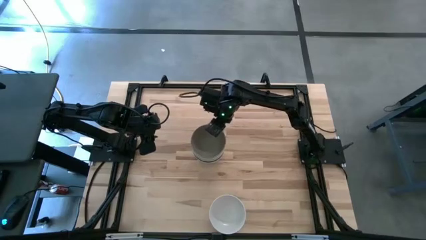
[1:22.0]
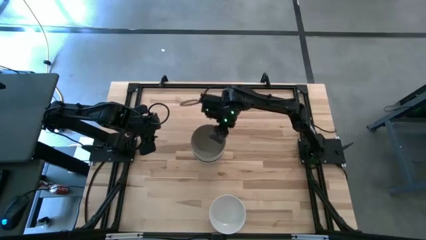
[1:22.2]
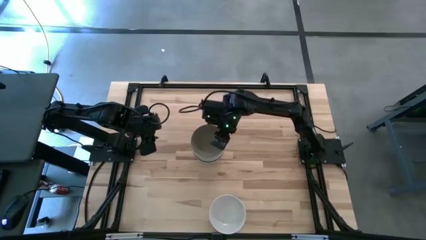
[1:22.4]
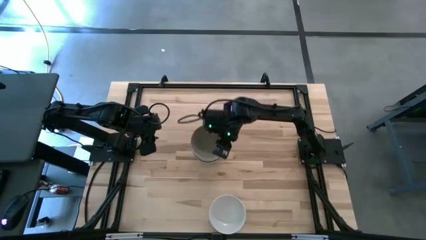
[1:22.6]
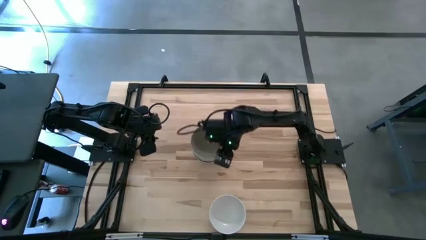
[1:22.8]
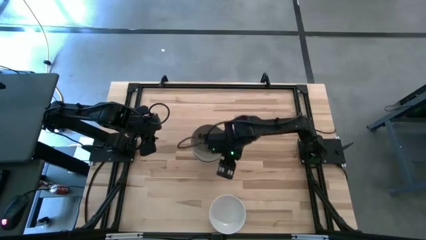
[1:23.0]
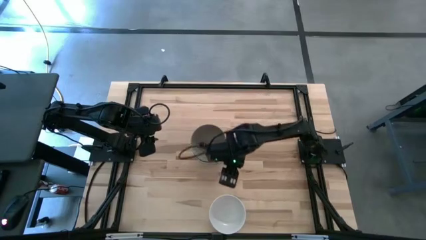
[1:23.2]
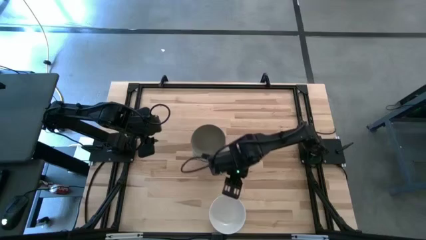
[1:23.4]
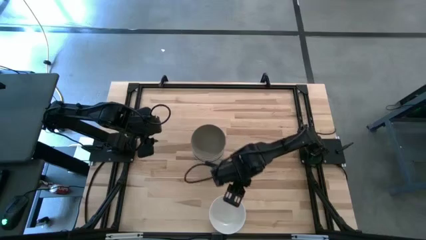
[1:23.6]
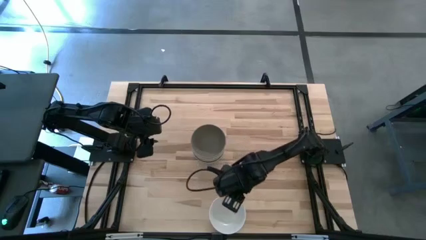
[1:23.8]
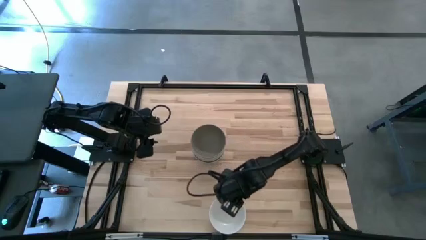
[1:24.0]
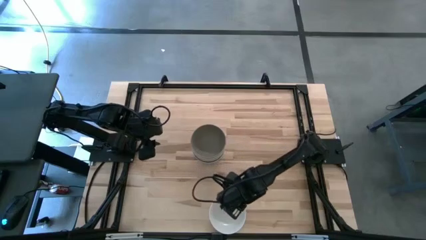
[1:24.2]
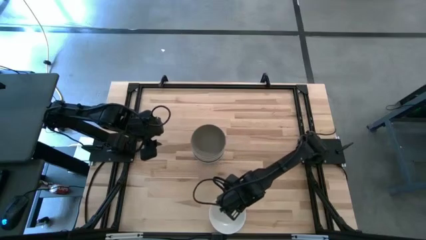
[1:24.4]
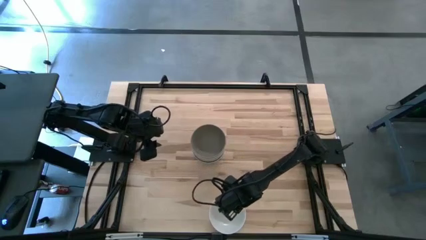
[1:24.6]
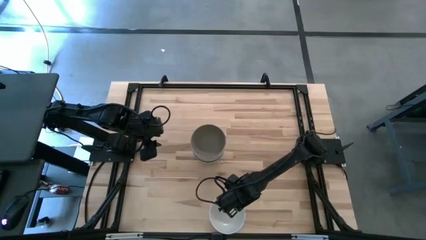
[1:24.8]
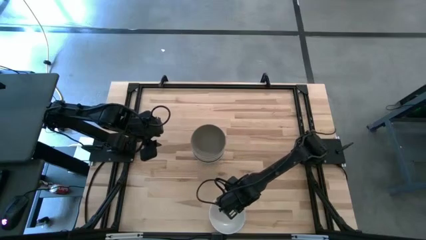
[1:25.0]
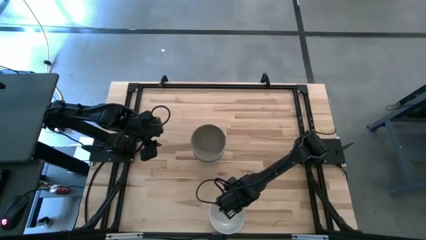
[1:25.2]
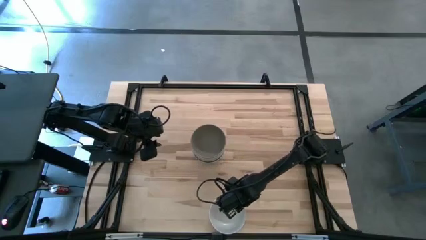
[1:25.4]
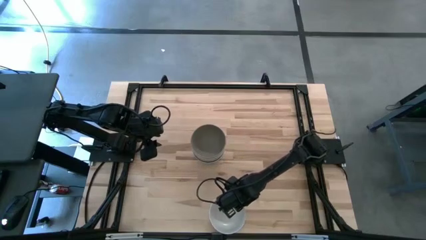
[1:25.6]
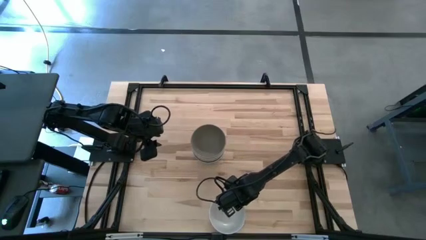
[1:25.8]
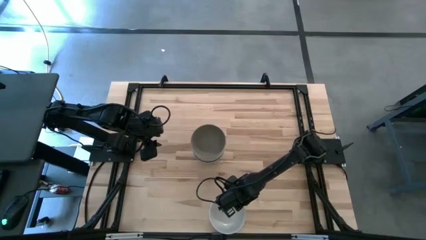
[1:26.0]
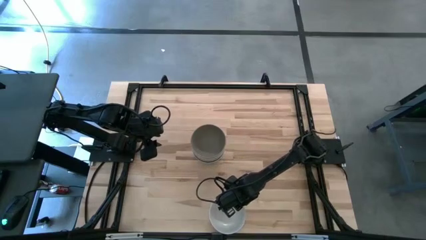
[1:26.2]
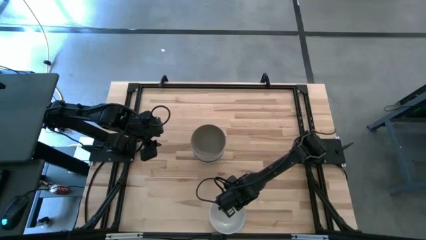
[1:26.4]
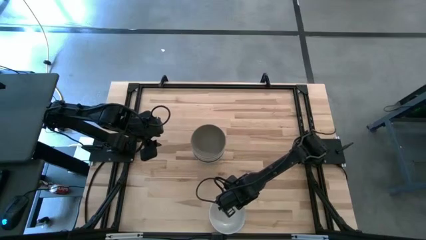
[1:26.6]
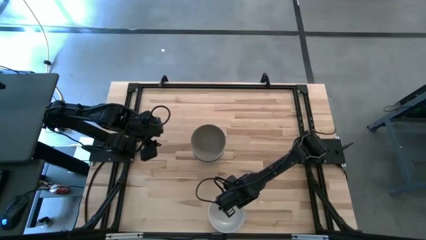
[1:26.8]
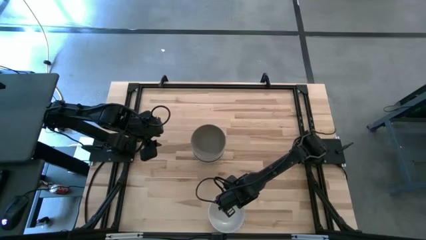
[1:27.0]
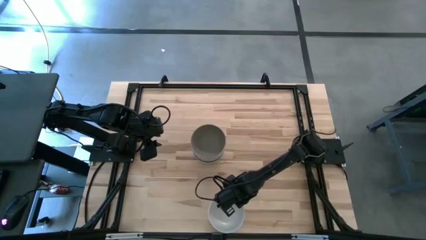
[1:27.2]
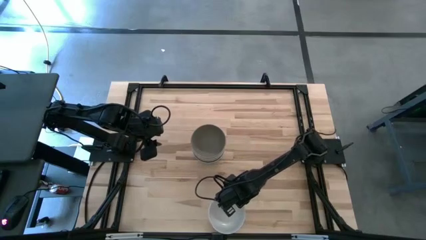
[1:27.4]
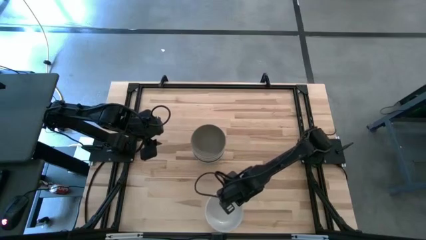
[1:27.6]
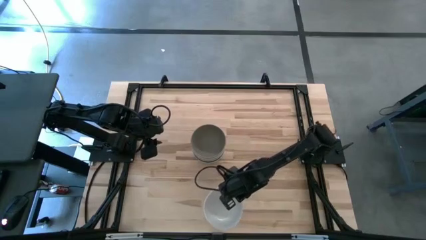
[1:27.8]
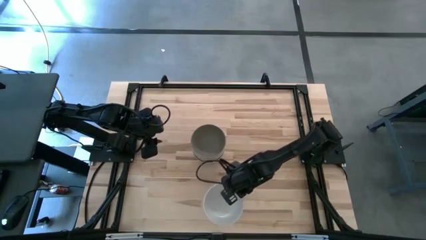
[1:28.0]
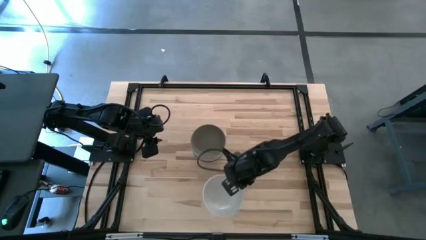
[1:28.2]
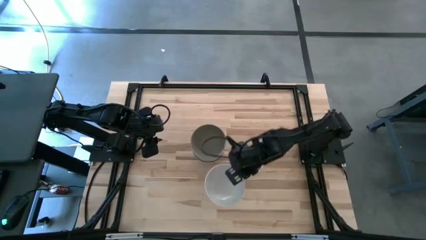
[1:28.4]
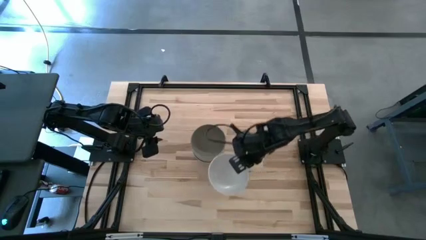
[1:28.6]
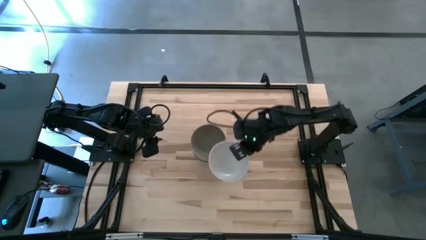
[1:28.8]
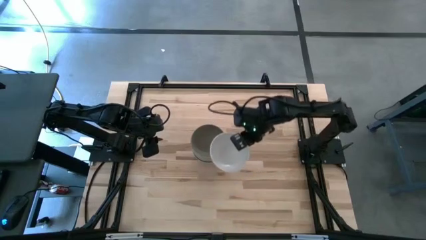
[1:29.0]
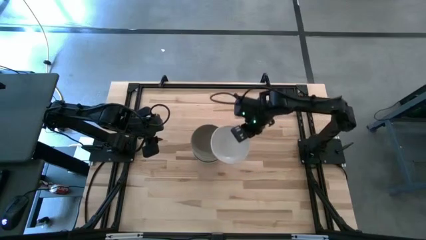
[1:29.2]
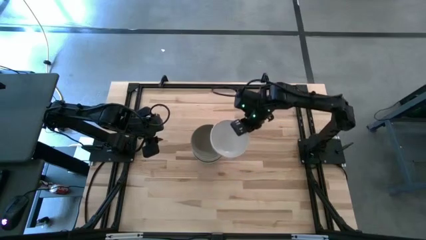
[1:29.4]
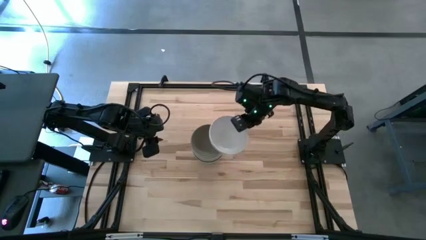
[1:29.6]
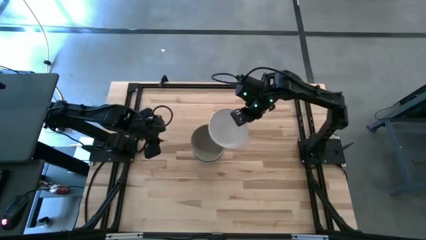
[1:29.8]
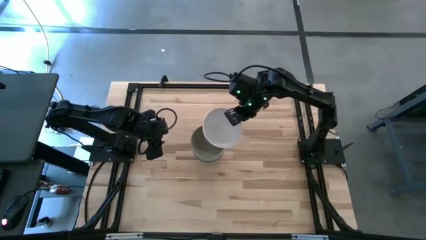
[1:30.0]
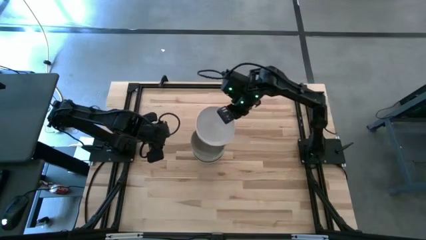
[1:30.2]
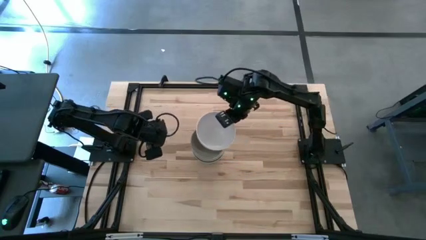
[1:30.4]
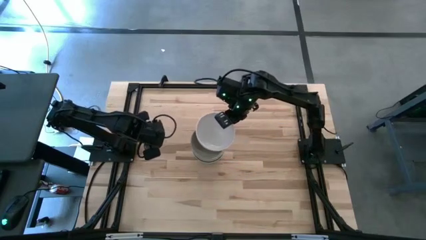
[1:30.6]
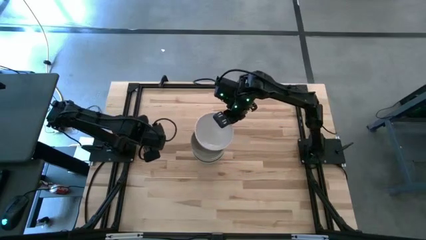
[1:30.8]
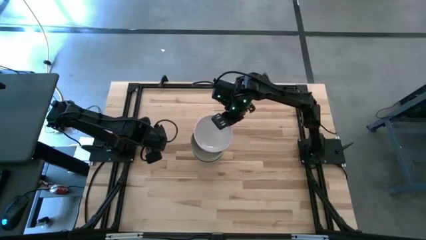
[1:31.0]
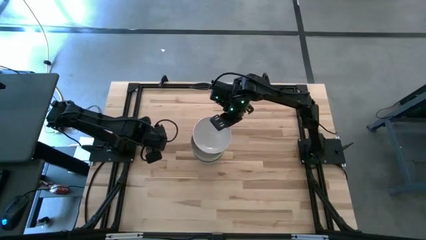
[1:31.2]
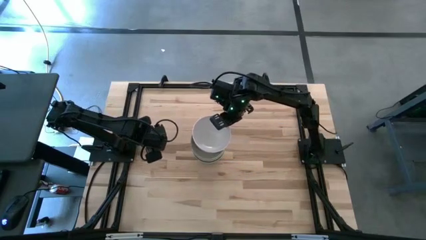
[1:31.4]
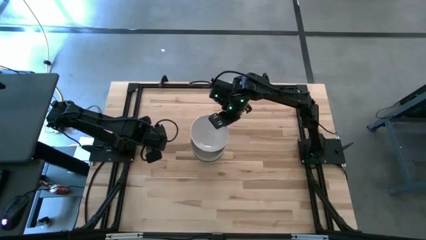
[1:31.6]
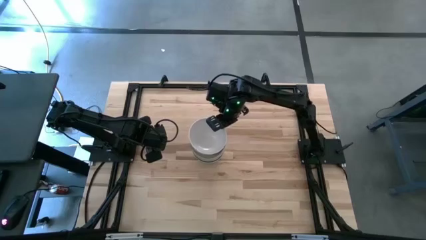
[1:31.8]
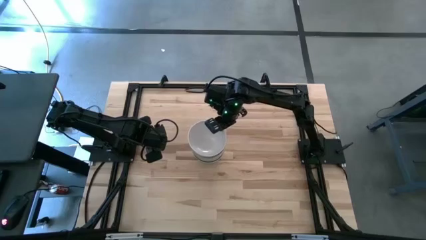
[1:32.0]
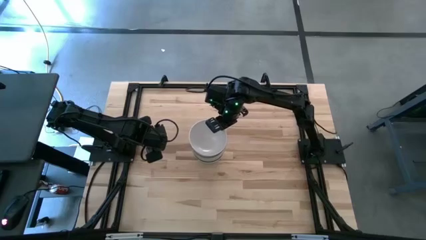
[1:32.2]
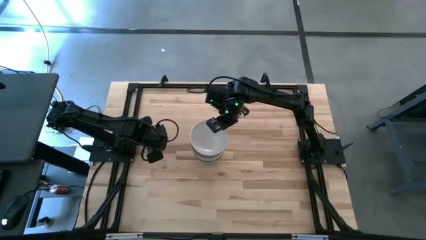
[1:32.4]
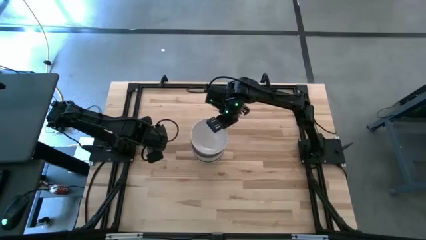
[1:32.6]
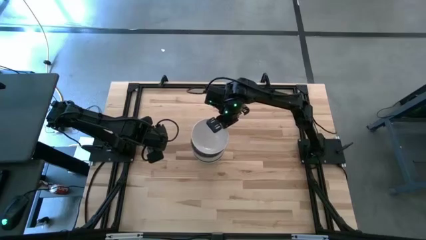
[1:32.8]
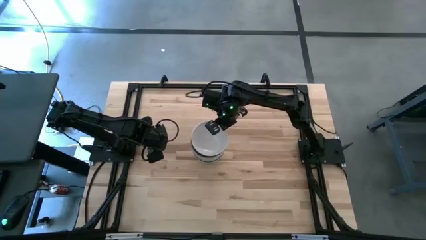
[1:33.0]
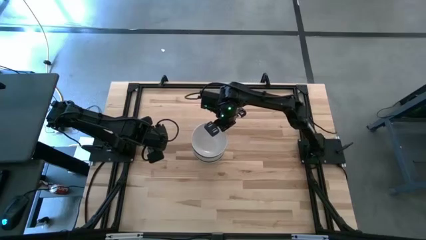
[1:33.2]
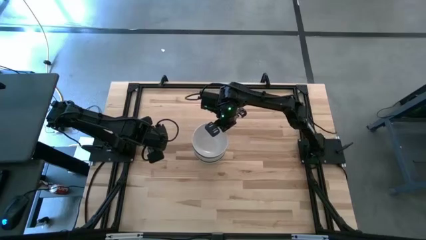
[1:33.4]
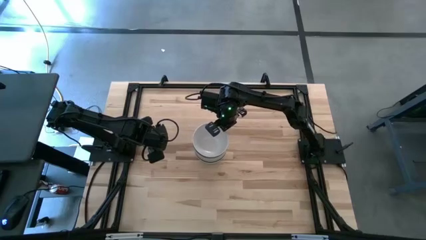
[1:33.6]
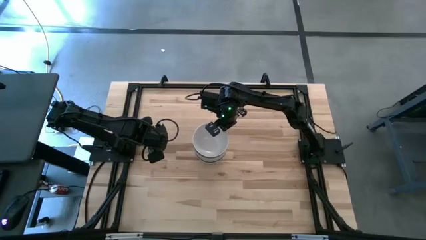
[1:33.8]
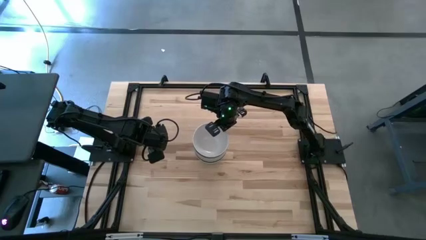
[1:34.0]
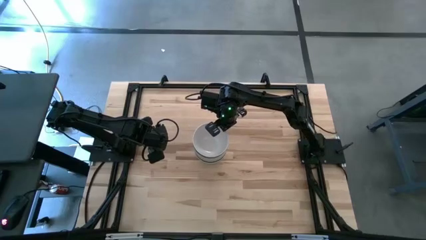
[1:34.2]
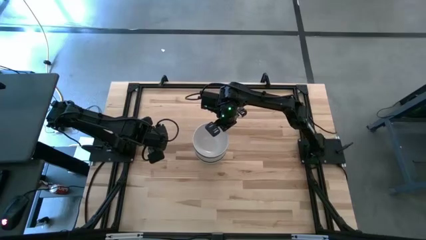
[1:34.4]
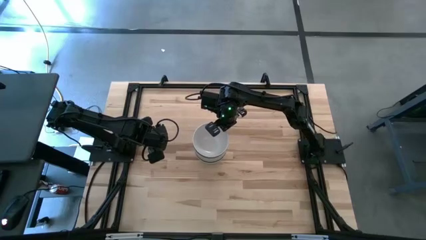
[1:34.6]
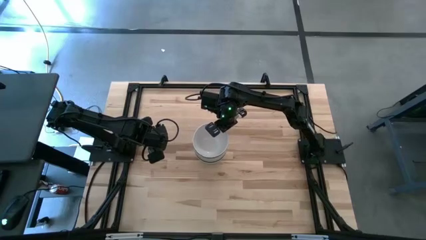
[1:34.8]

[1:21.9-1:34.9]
Task: Nest bowls inside each other
Stack the white bowl on the gray bowl

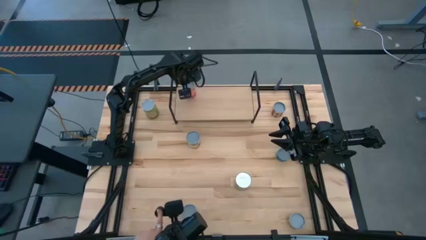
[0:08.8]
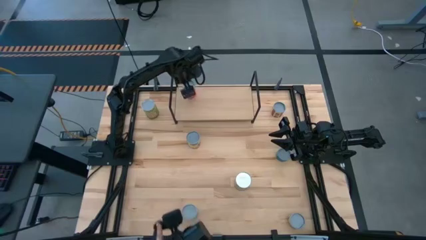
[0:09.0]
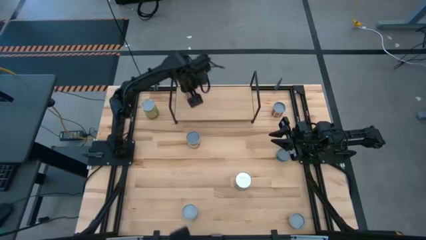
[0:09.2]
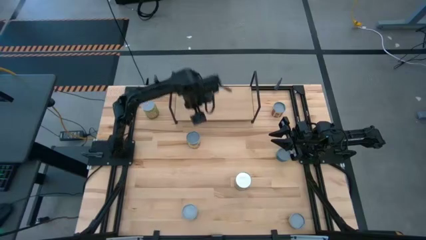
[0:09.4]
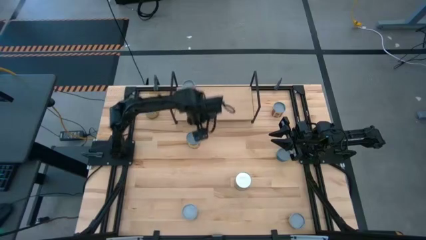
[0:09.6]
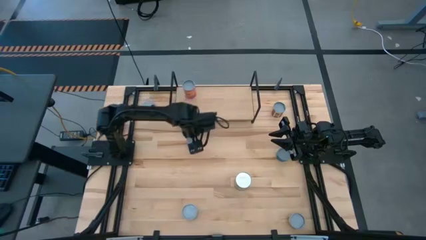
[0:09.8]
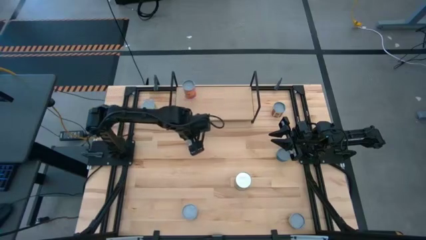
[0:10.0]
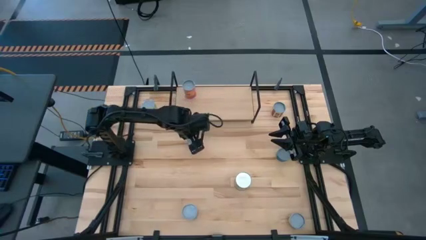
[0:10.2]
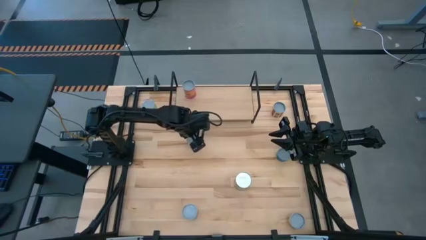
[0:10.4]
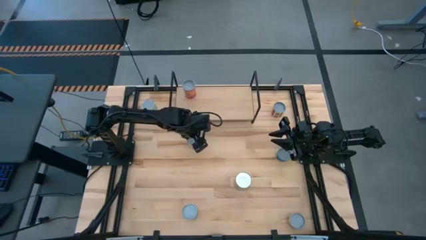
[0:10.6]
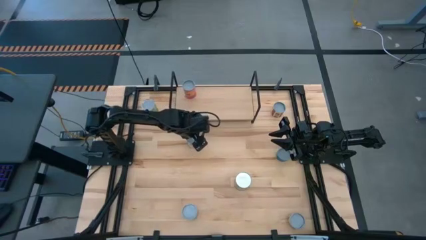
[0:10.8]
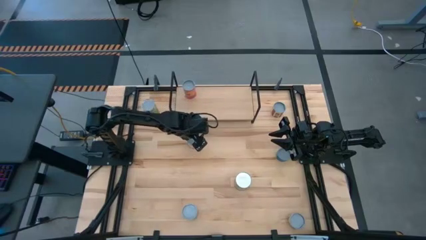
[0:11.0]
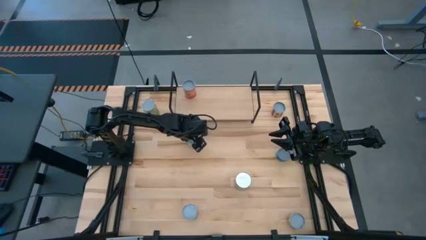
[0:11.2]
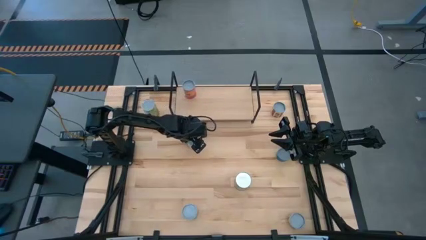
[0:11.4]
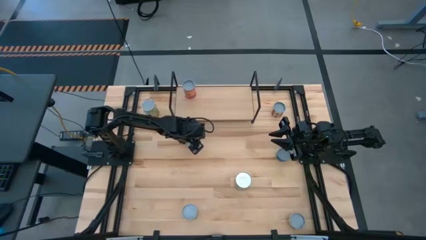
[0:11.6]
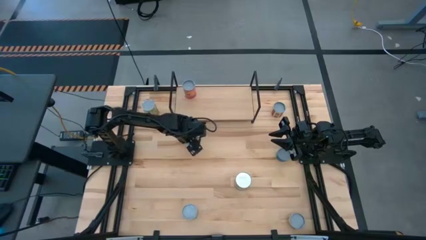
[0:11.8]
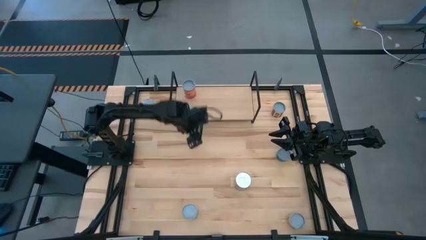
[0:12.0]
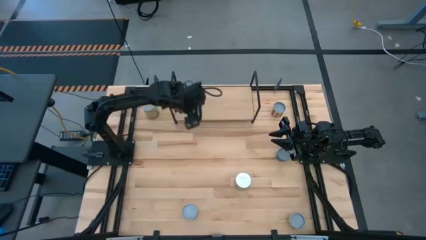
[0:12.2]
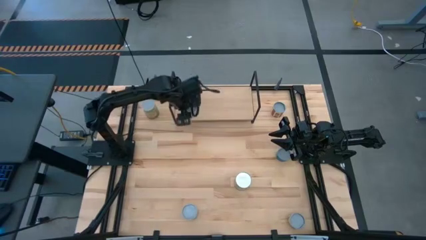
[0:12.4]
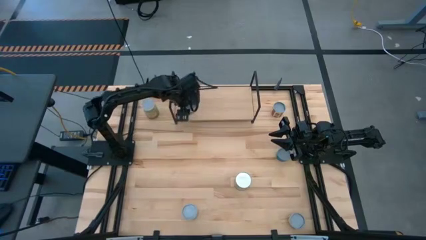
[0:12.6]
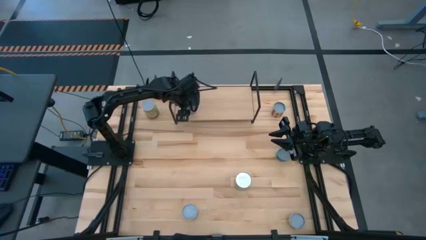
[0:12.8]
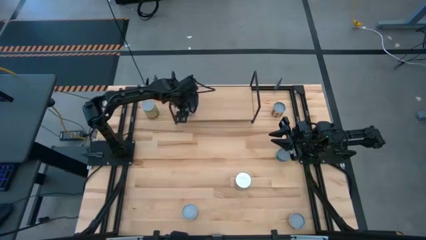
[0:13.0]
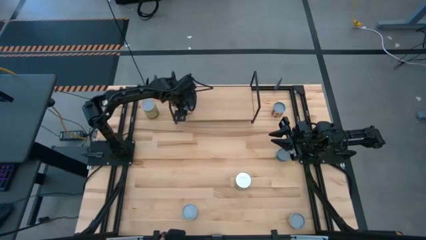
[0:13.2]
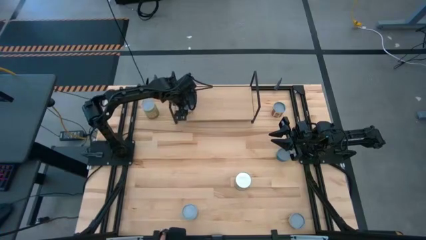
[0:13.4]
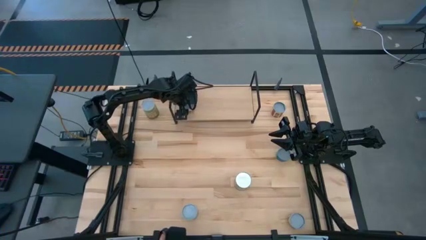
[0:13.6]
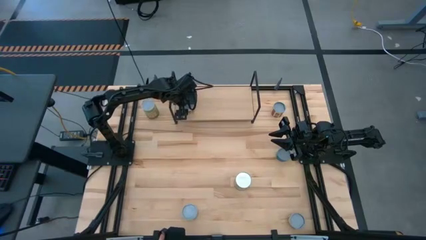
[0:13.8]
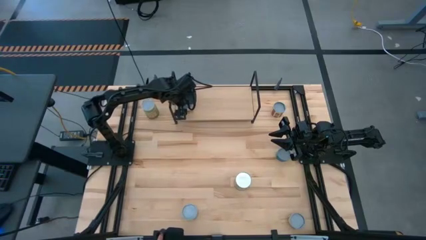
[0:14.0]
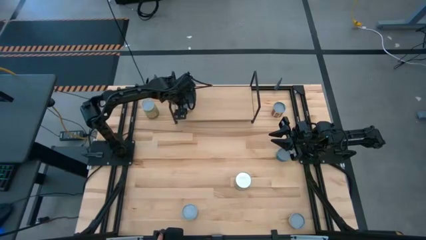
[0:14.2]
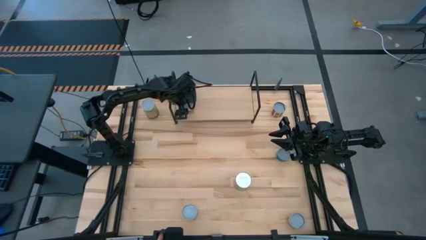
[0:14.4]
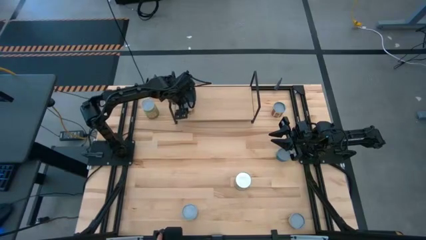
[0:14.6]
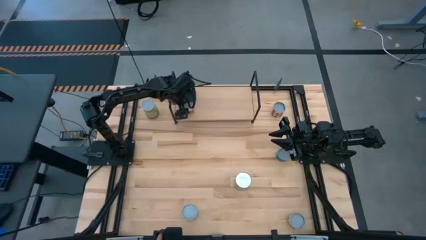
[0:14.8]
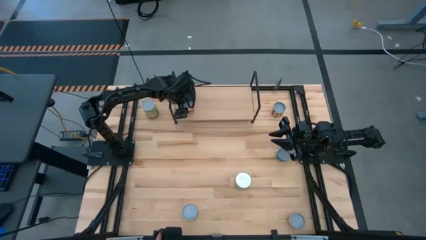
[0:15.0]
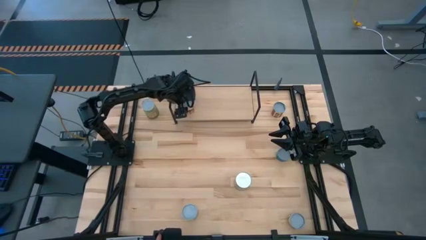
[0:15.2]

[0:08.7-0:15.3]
Task: Pick and place cans onto a shelf
Put the canned spaghetti sauce on the shelf
